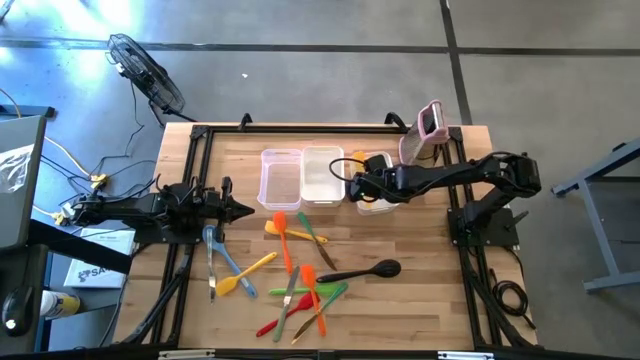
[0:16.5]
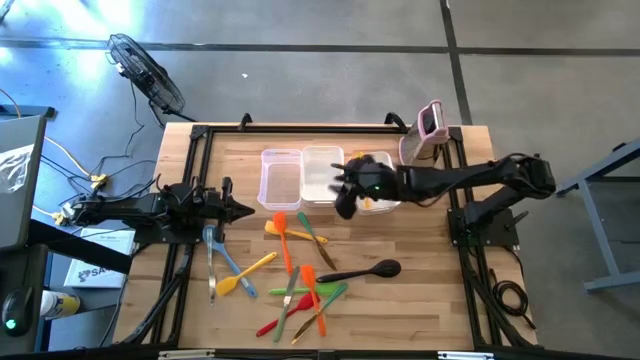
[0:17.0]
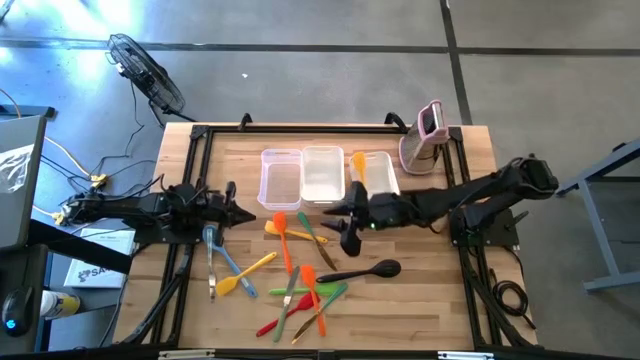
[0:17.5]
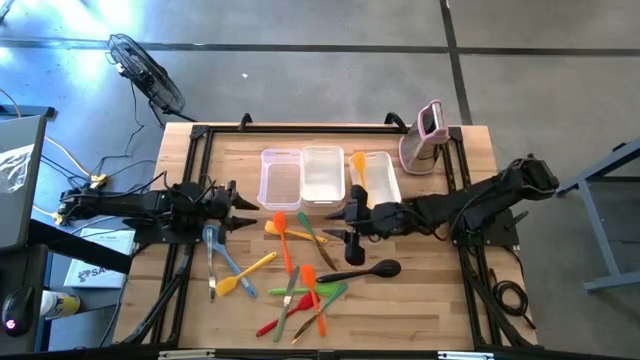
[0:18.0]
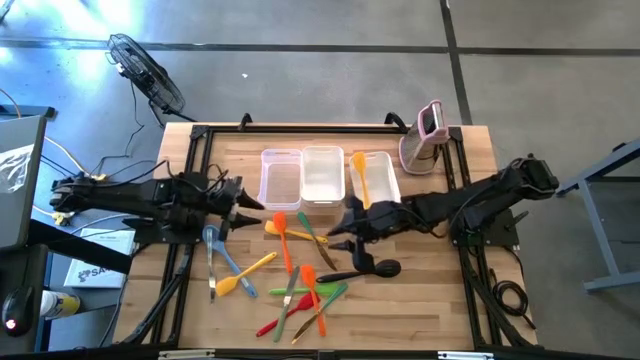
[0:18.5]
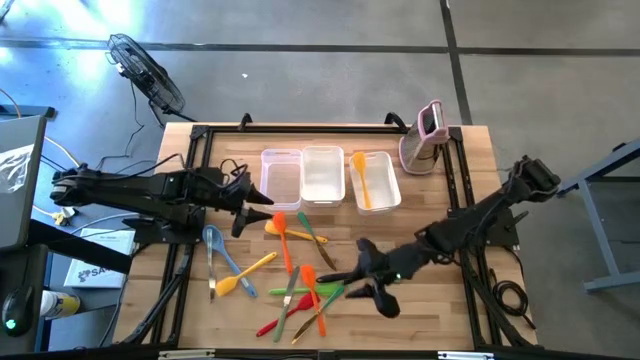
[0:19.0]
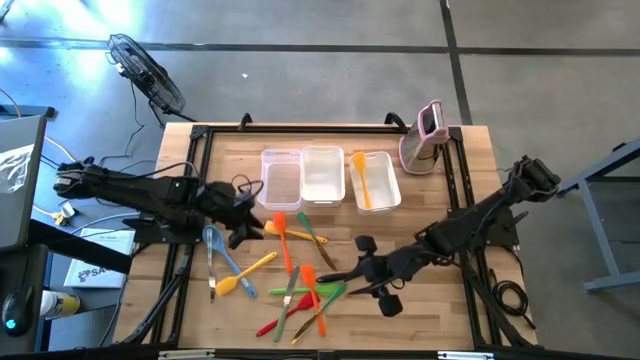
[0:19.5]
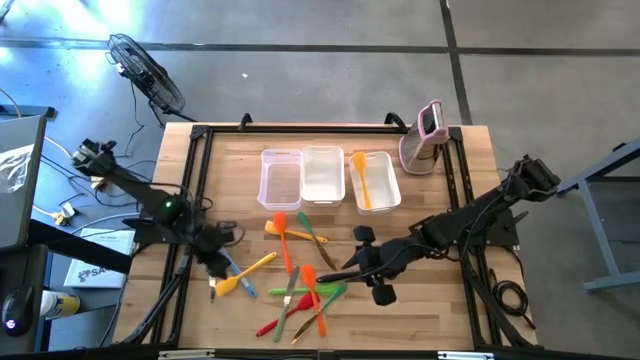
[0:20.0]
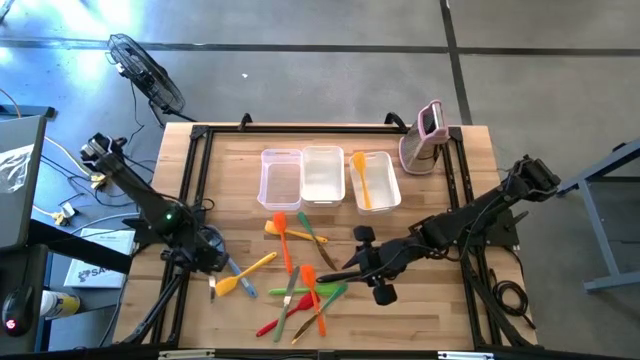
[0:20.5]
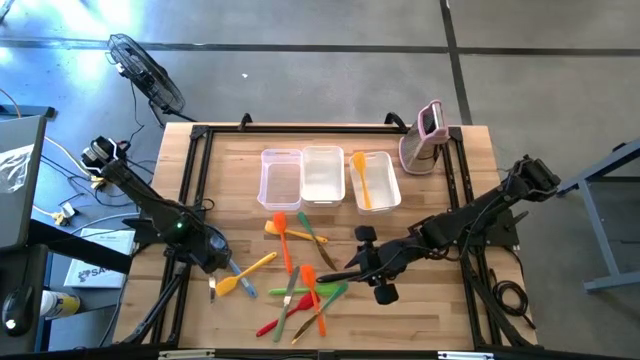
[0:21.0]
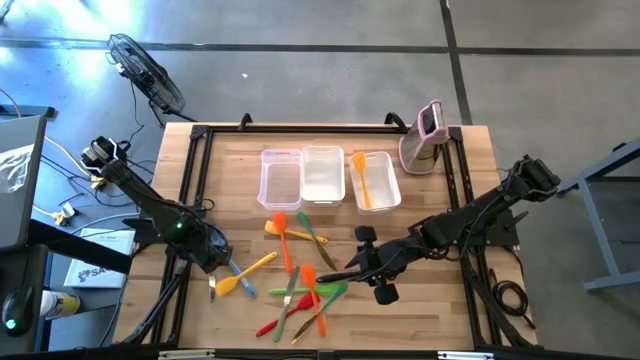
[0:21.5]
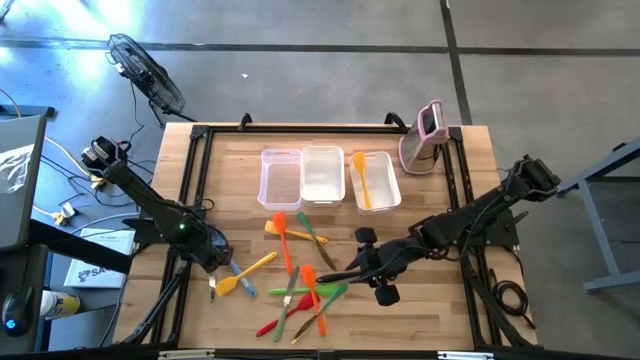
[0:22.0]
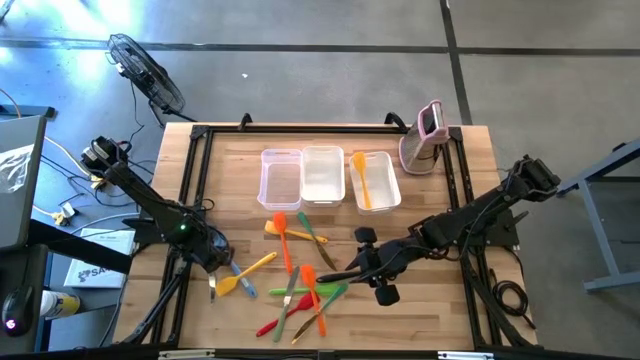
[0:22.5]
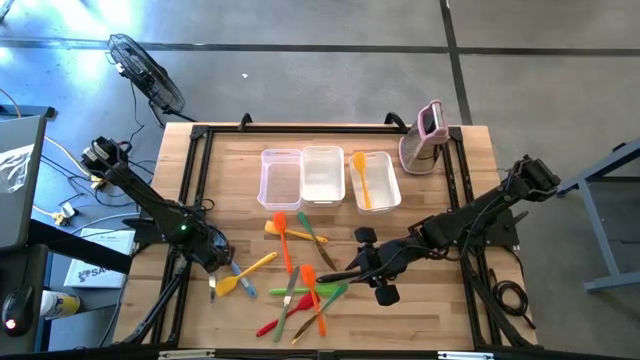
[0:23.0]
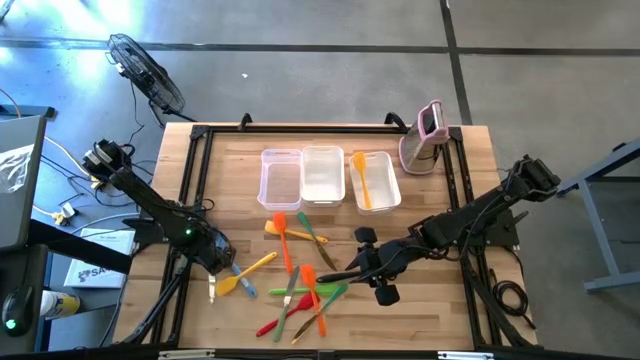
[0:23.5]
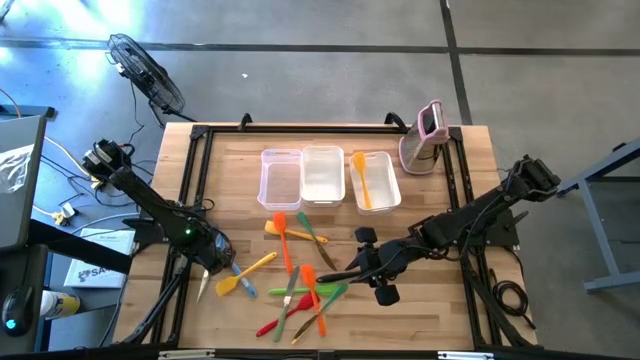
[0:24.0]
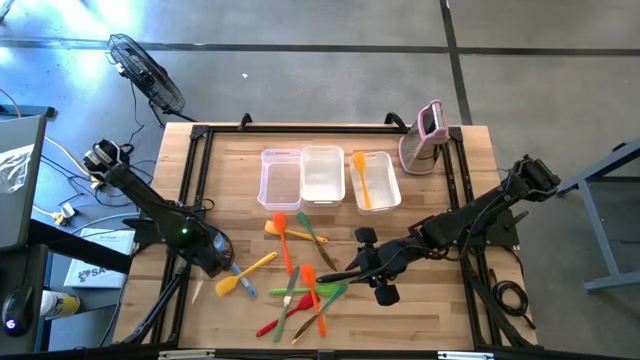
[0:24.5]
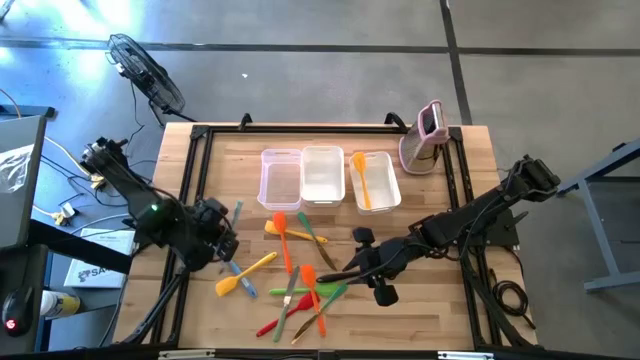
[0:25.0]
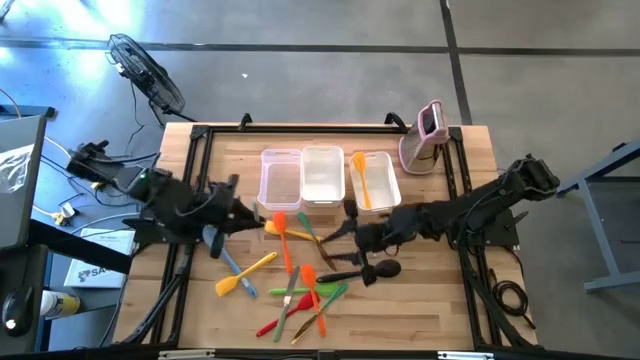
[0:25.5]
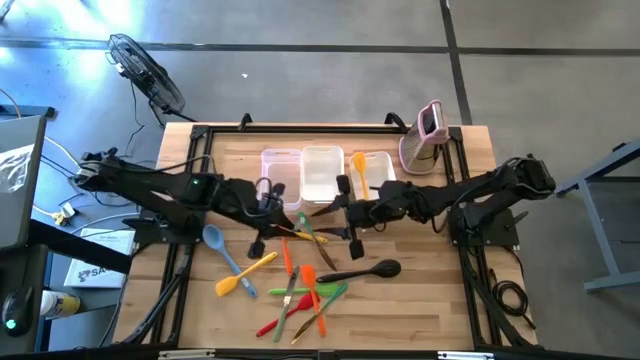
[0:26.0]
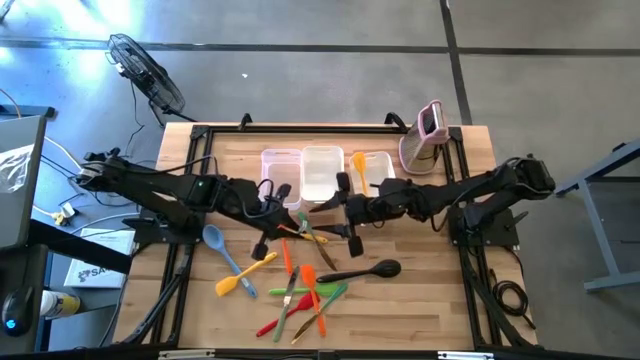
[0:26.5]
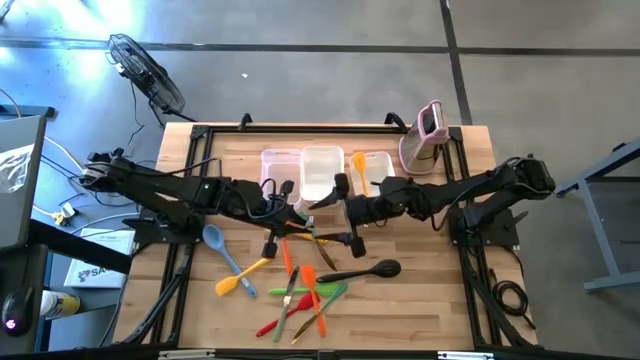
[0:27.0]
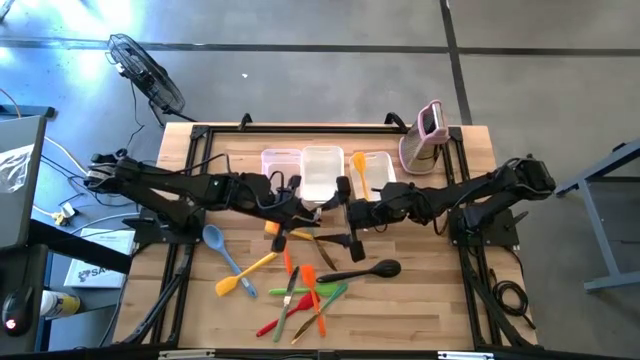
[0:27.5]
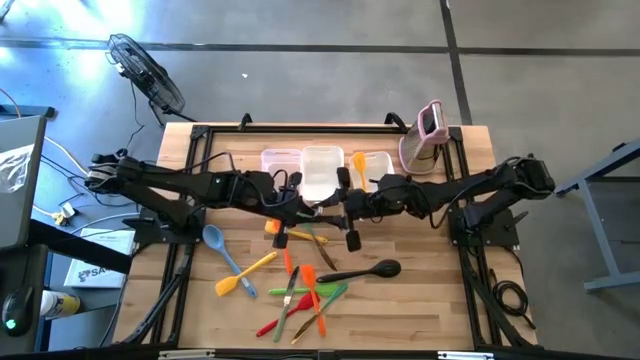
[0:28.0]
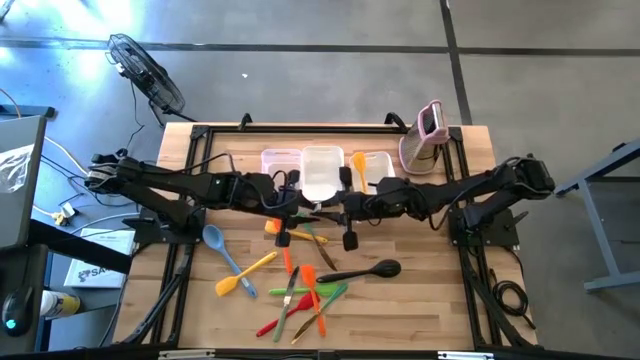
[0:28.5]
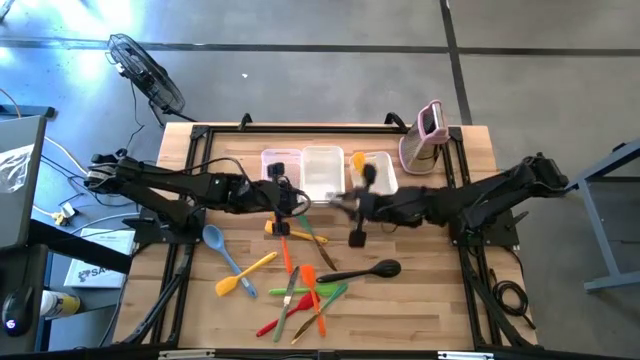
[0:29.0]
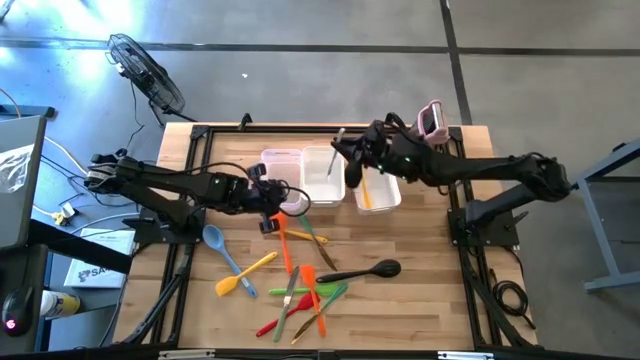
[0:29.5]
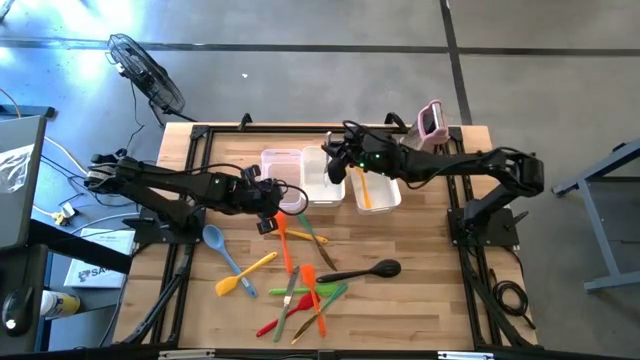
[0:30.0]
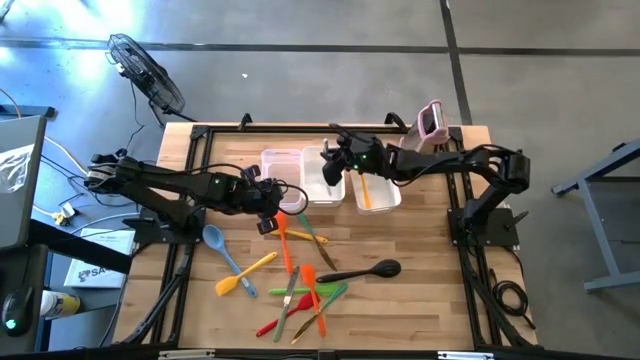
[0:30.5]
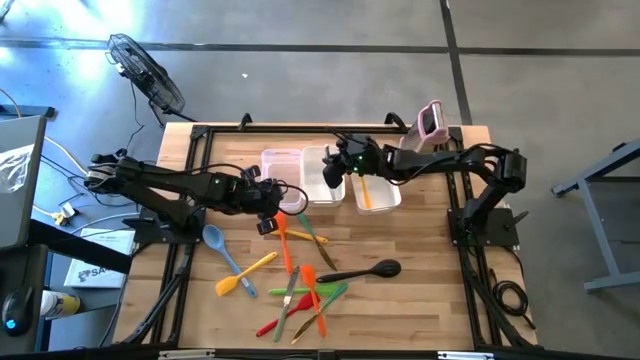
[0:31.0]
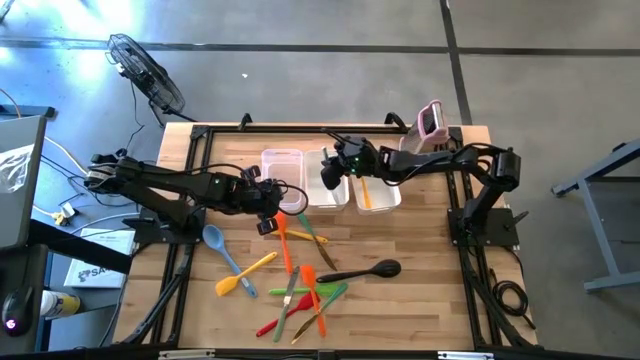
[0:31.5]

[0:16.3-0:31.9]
Task: Pick & Place Kitchen Items
Put the blue knife into the left white bin

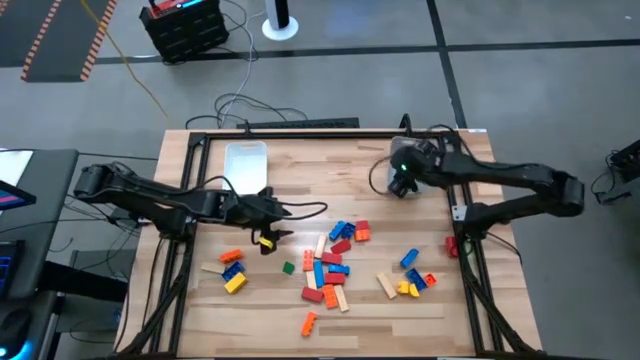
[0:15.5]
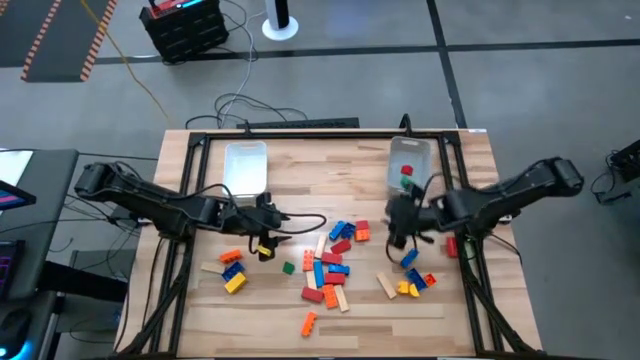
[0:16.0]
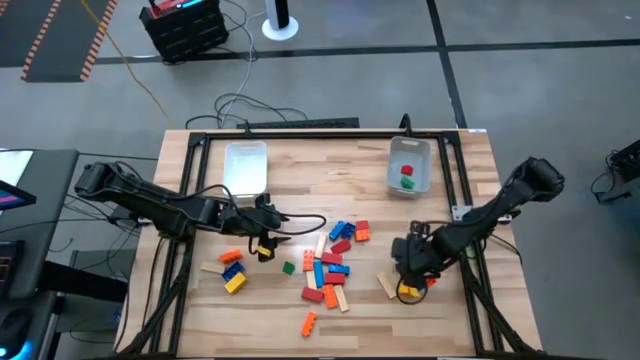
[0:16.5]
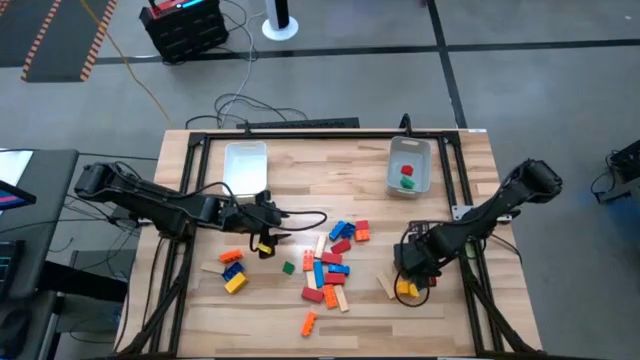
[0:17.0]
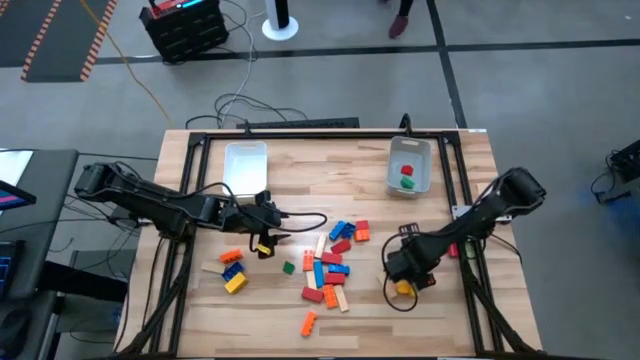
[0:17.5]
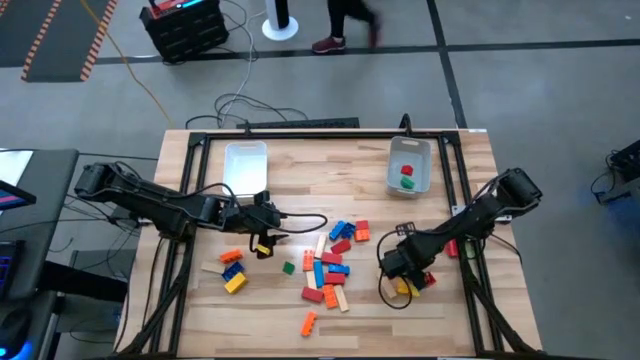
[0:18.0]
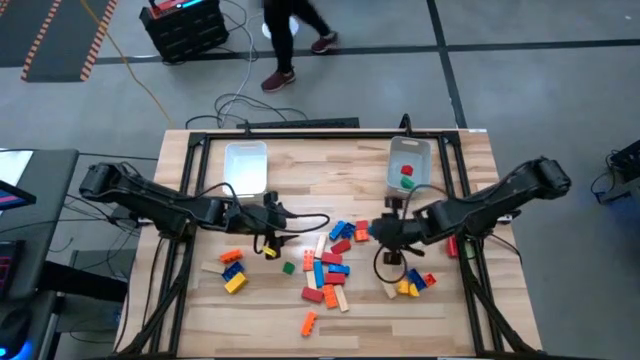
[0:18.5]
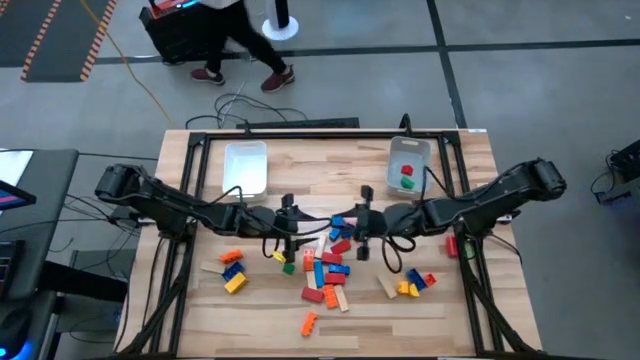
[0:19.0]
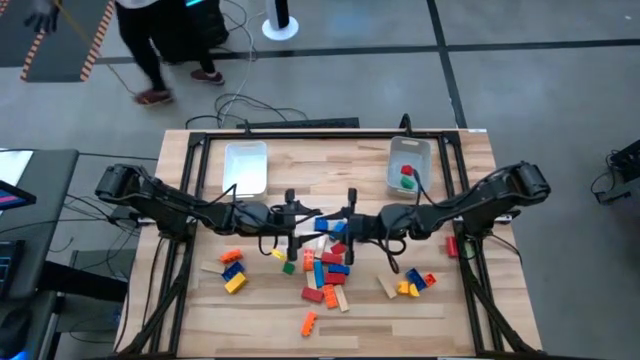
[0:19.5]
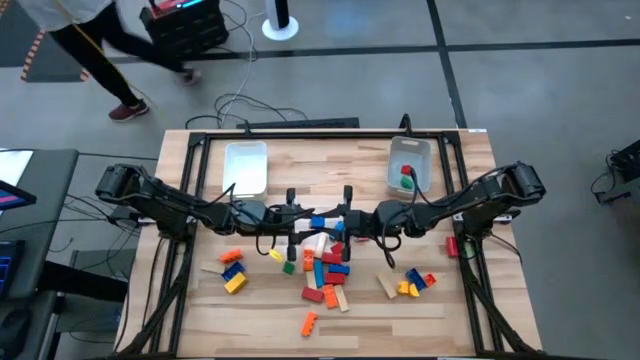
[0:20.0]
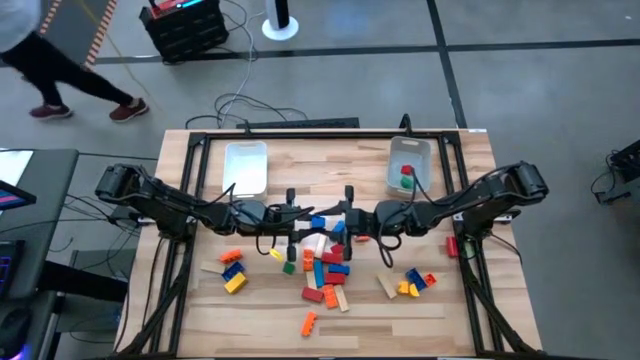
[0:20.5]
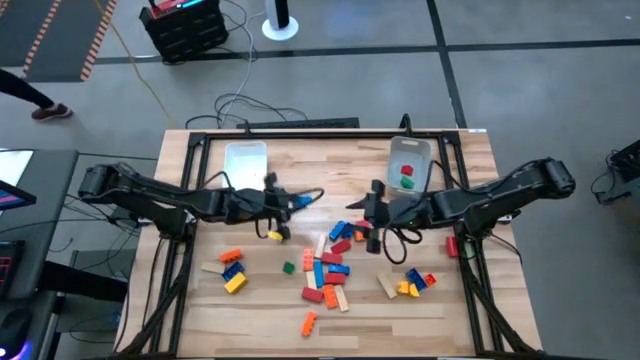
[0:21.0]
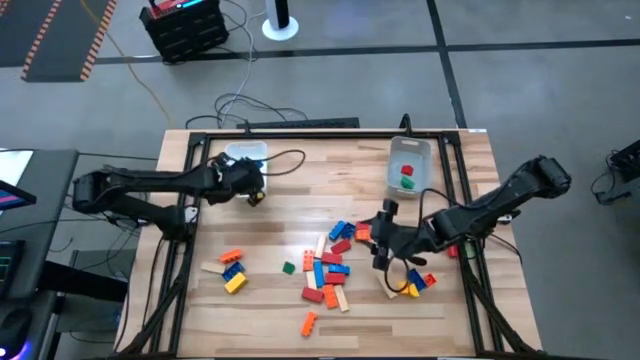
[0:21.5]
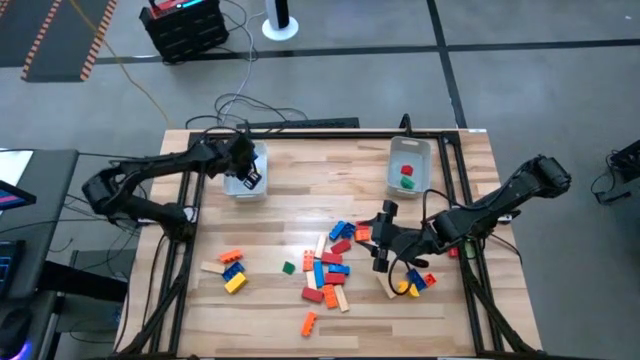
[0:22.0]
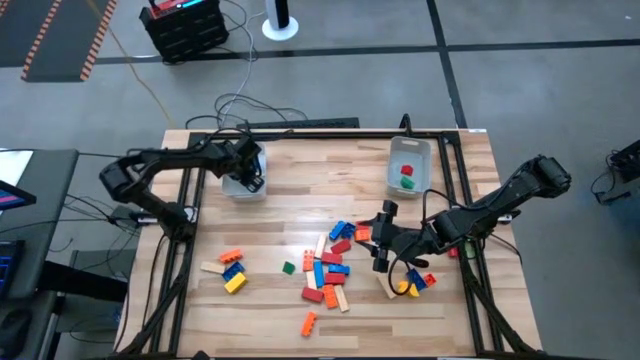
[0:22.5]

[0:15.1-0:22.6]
Task: Sort blocks by size
Put the large blue game piece into the white bin
